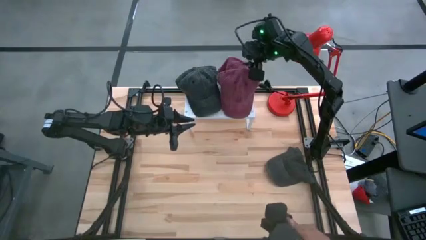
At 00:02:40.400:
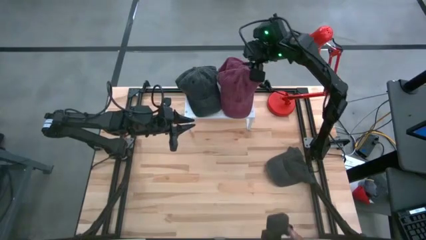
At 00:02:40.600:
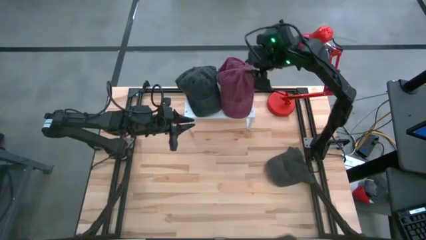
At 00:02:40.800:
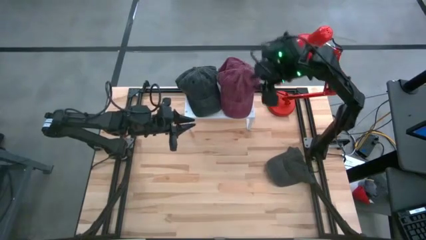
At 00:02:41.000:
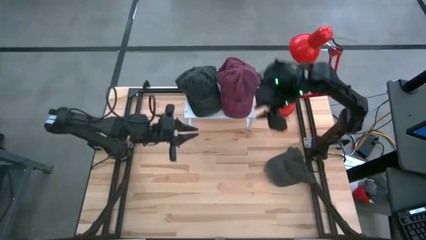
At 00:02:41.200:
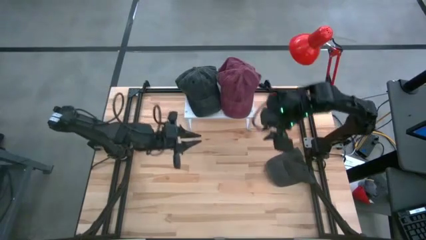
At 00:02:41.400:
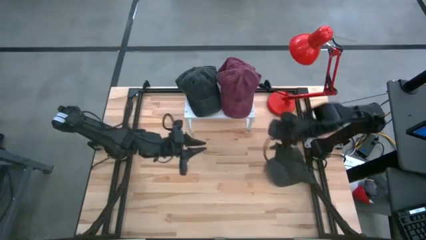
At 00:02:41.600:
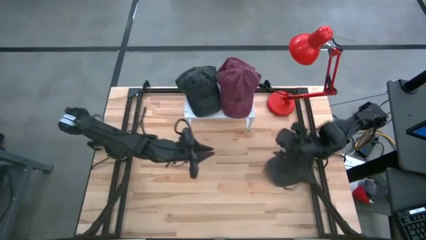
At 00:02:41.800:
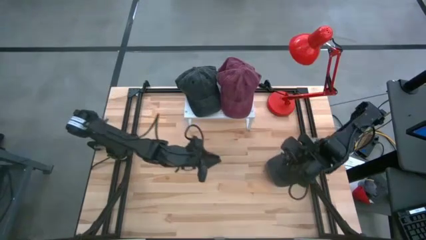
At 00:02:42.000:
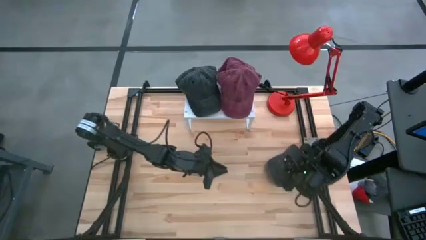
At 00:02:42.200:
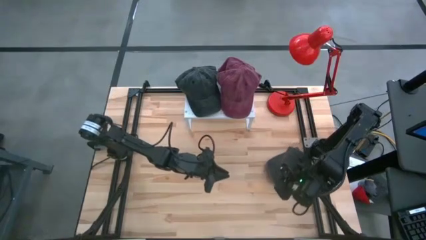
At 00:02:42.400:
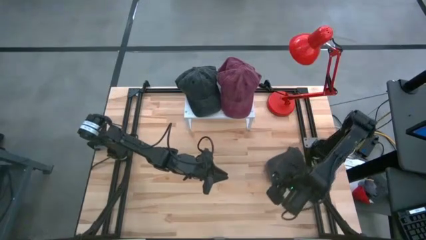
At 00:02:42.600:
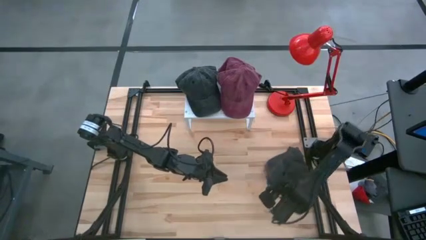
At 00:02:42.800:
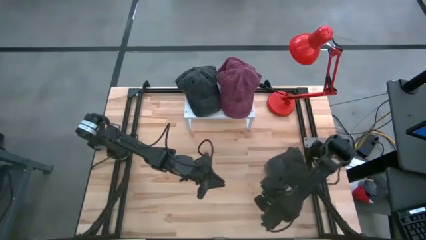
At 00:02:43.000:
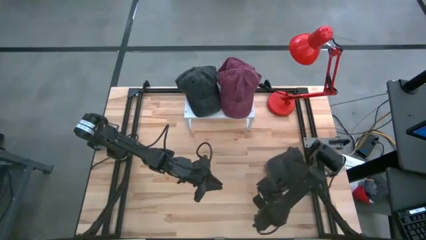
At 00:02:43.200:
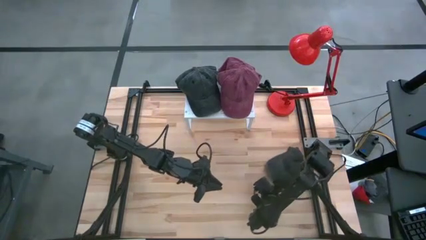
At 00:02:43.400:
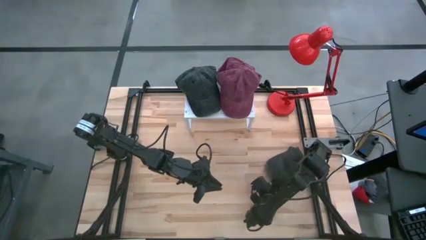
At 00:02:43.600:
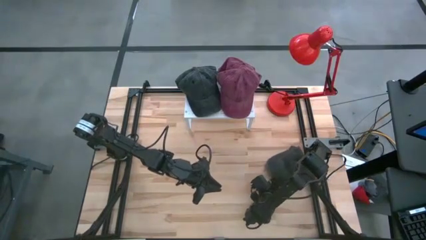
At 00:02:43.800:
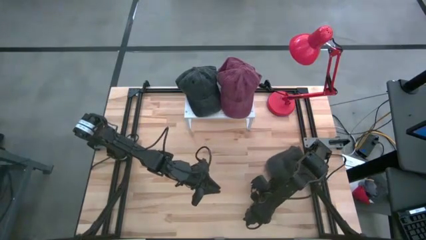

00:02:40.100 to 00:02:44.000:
Task: Pick & Place hat
Stack the black cap on top of the black cap on the shelf

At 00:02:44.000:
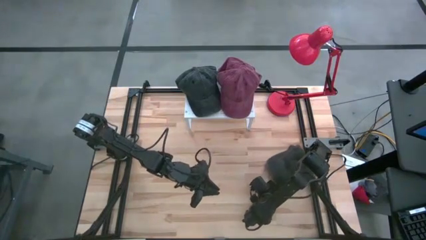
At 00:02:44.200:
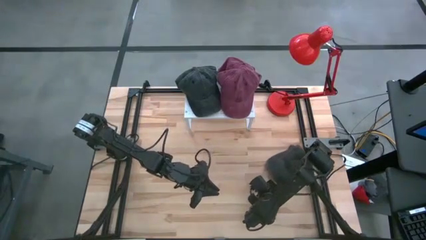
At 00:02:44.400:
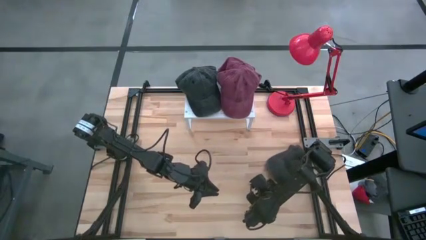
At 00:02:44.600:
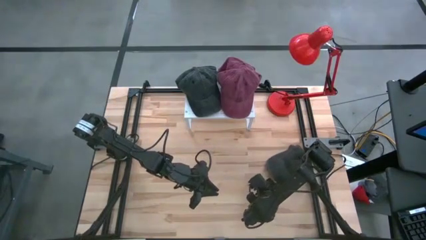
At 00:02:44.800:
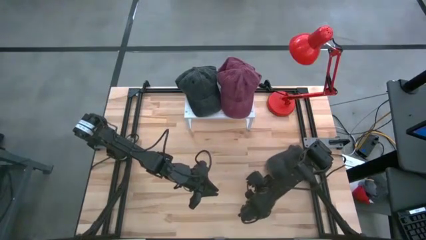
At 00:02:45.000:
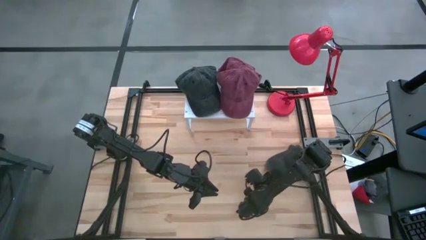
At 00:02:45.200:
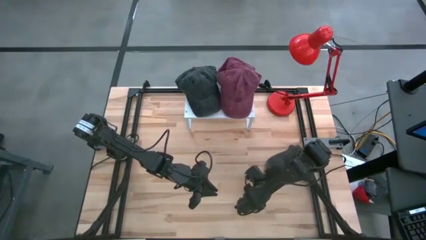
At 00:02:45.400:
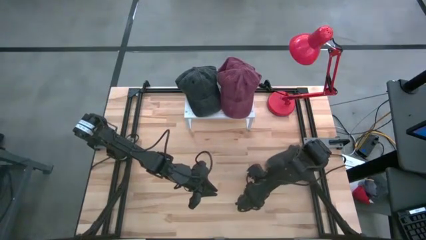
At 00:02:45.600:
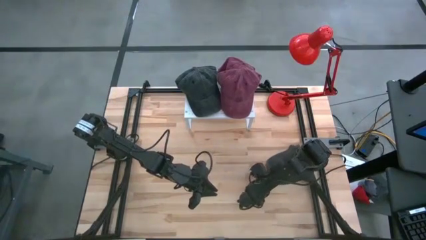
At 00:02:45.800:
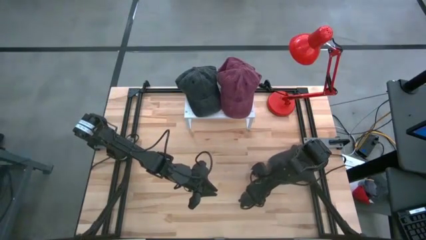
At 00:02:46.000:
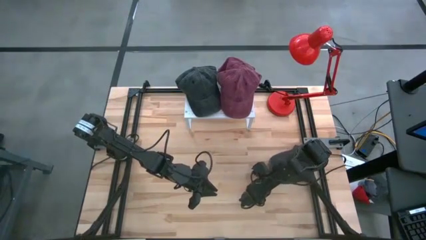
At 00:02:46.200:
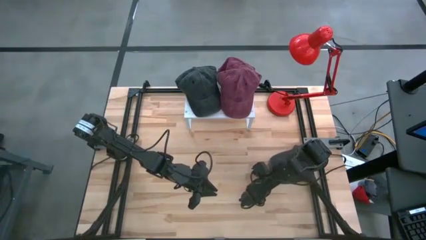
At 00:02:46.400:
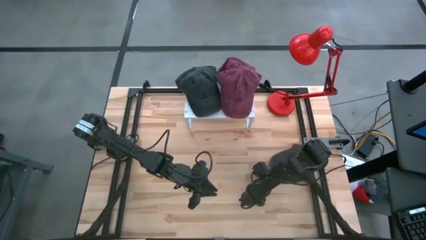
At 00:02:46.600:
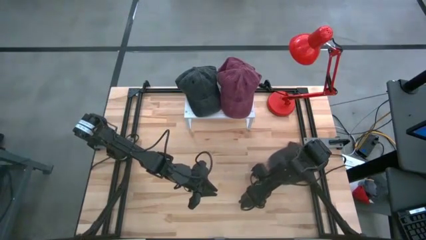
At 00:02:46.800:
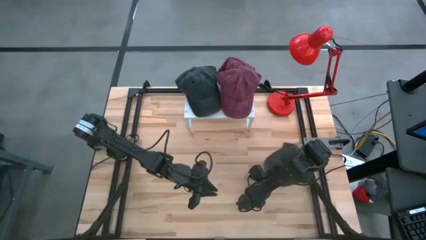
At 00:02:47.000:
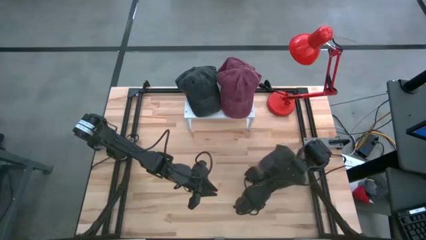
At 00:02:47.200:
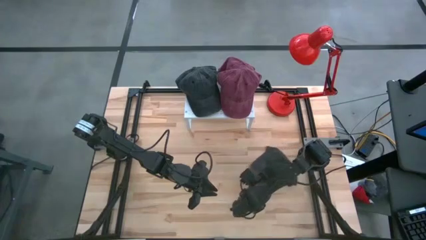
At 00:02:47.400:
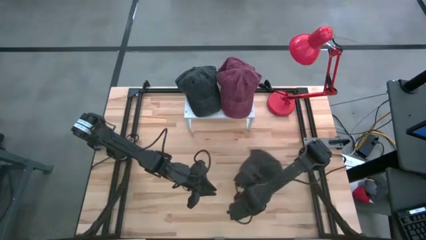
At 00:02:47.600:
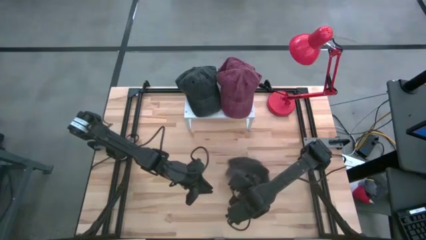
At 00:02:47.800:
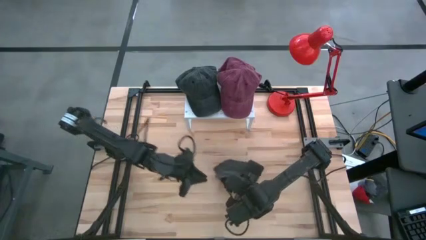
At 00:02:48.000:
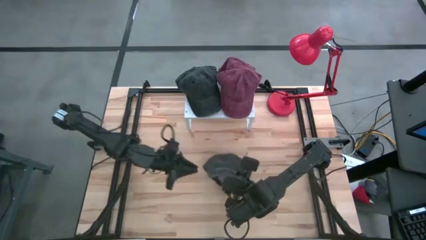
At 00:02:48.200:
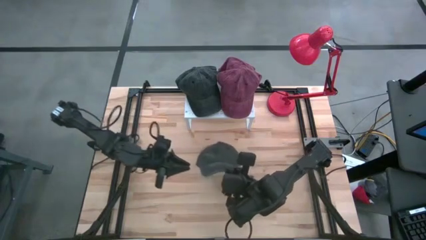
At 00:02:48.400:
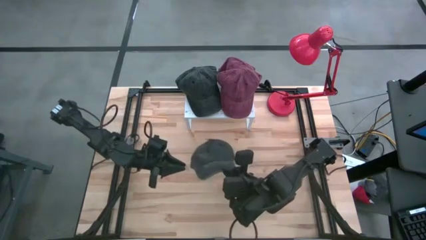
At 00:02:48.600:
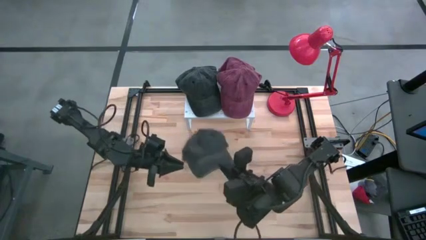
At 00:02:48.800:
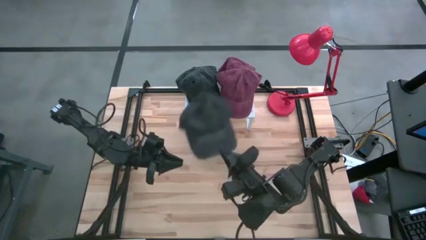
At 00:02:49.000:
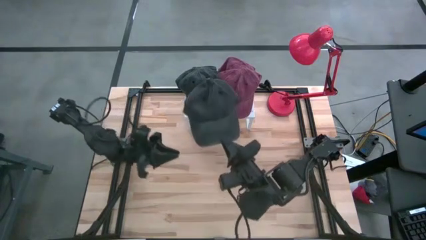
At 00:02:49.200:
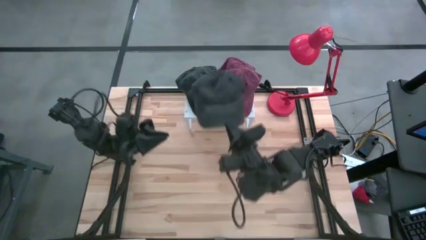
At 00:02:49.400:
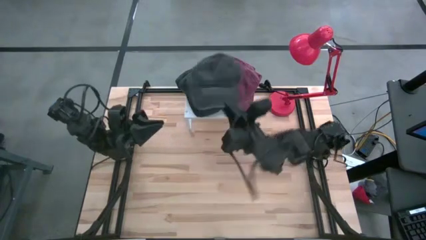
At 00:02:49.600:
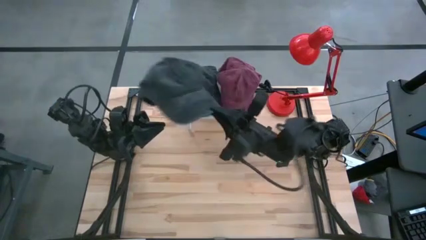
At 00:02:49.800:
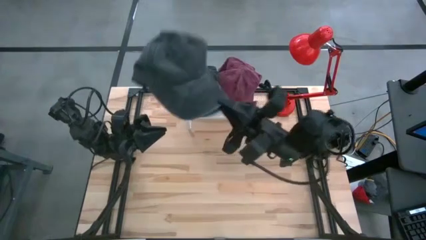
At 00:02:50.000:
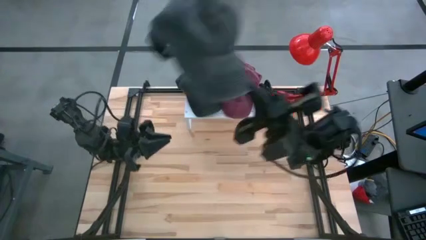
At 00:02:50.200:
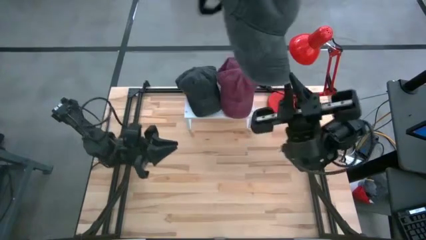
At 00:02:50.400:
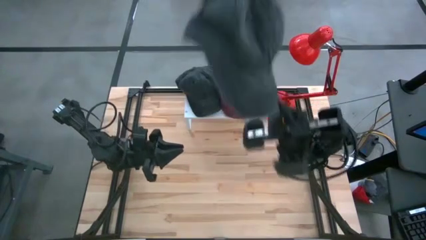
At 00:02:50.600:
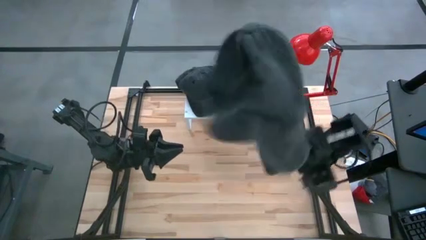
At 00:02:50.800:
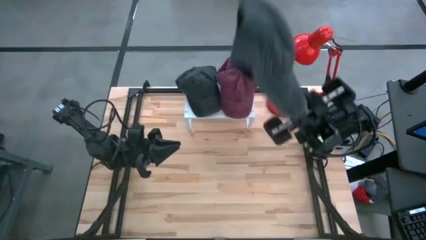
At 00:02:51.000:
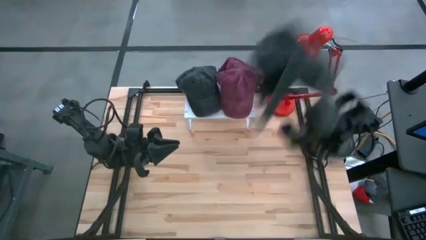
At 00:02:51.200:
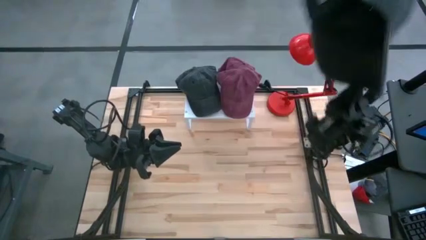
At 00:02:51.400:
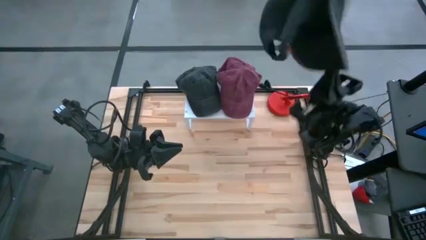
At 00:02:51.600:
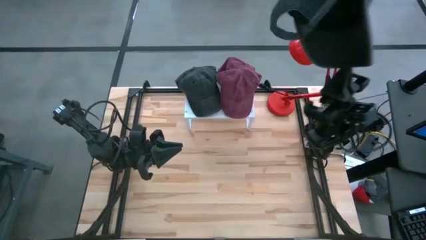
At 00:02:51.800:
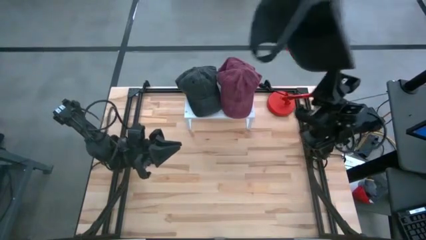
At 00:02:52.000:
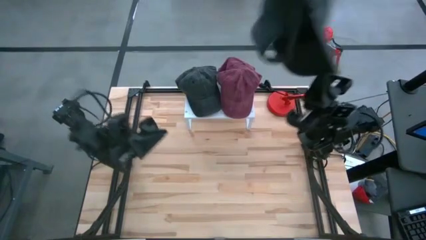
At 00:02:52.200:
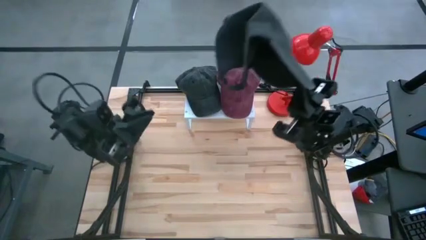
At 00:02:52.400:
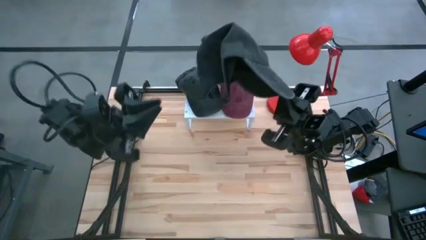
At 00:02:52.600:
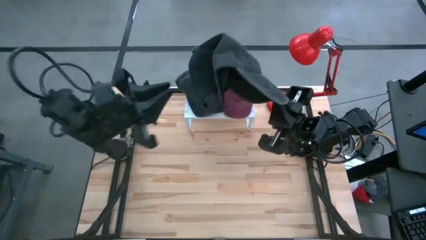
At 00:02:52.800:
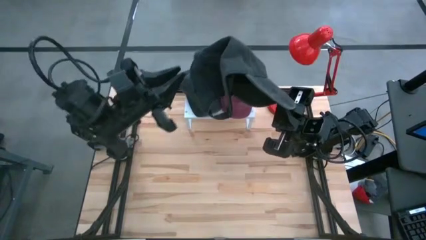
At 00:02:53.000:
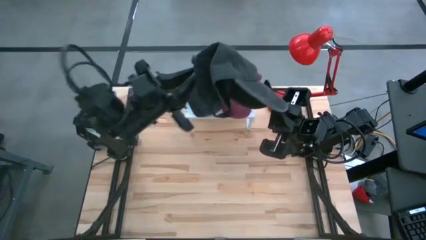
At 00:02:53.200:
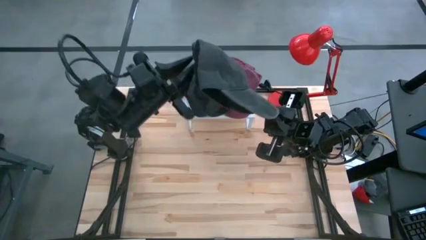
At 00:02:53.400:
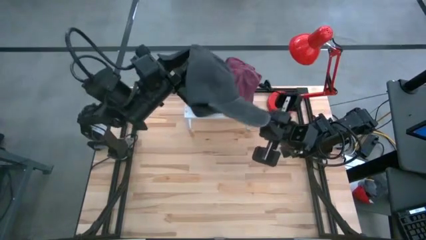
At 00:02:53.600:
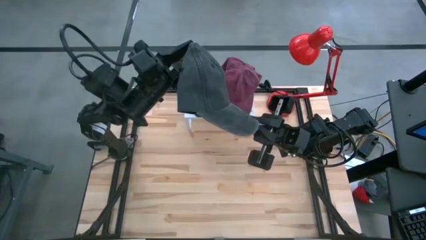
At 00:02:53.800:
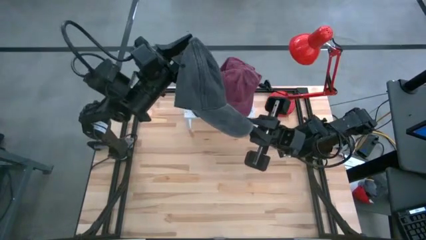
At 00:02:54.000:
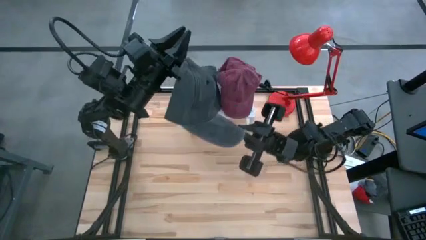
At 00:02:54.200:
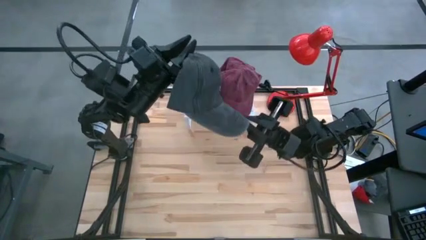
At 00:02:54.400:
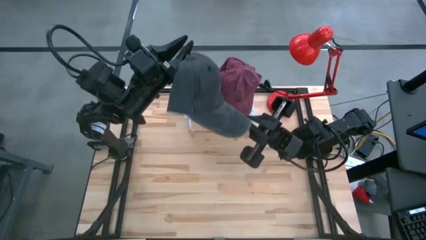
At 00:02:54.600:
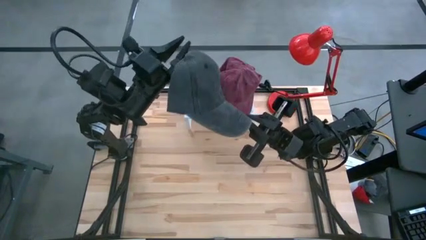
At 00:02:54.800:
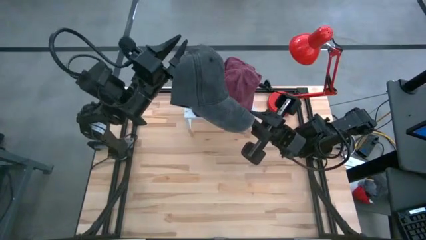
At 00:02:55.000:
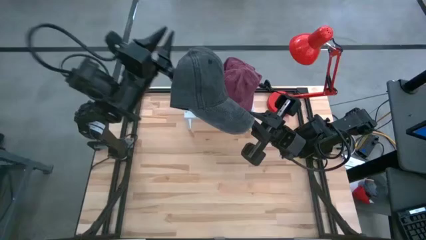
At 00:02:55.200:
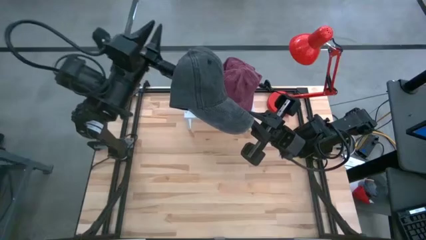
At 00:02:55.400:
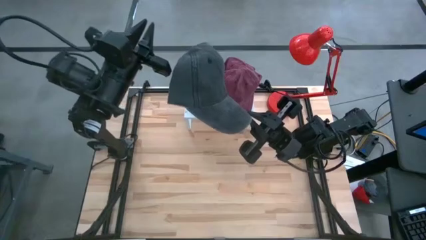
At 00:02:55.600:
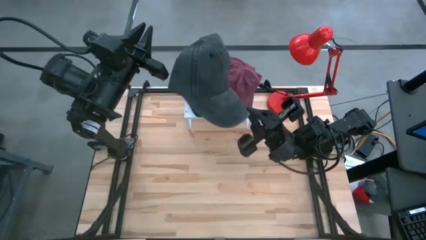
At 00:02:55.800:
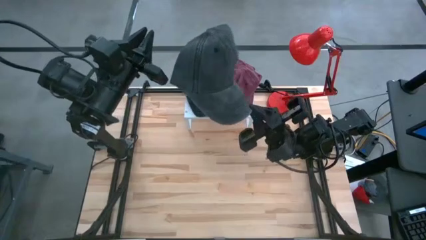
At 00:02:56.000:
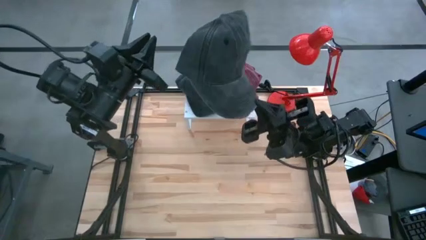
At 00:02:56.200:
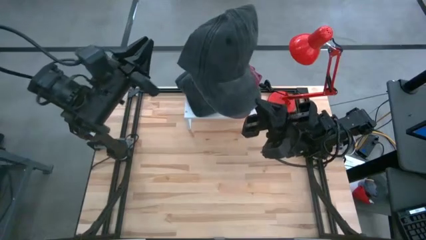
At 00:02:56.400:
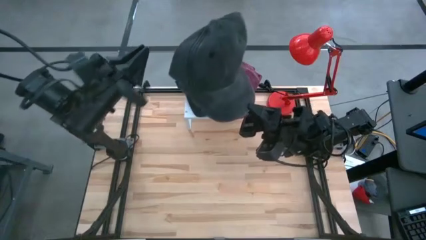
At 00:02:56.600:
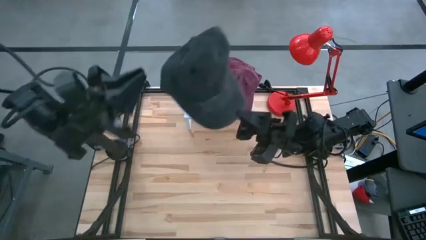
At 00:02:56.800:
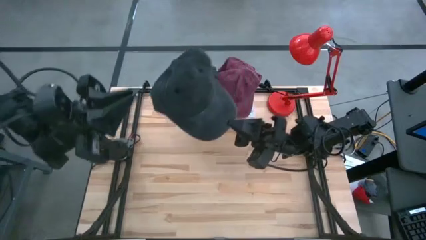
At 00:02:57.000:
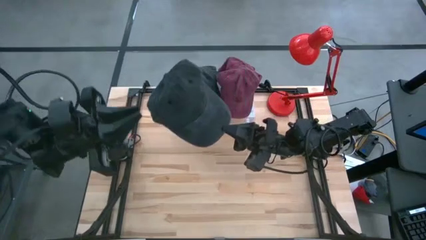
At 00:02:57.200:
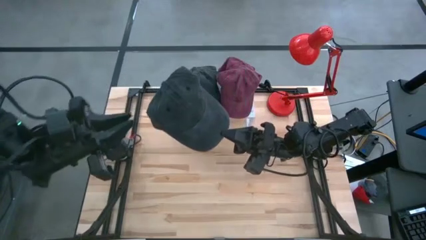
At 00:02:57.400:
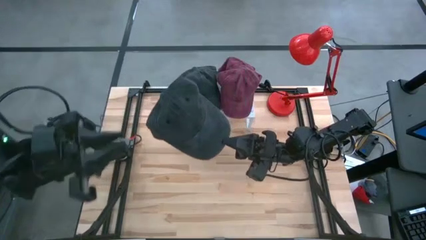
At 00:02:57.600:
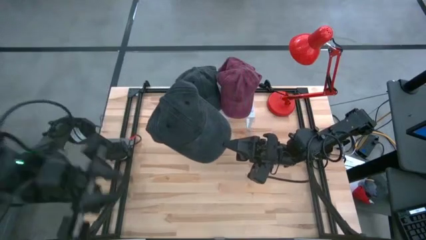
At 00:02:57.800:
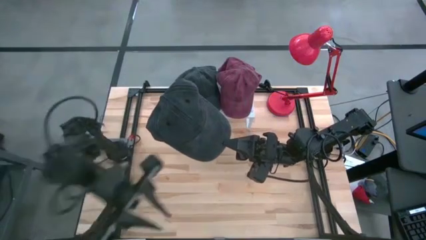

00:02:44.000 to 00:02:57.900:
Stack the black cap on top of the black cap on the shelf
